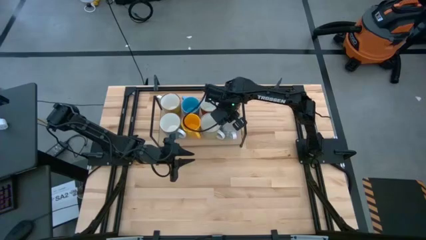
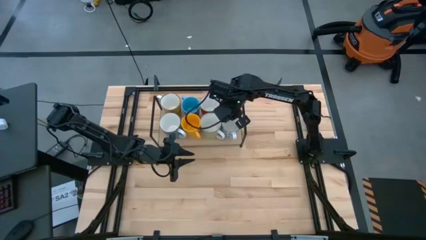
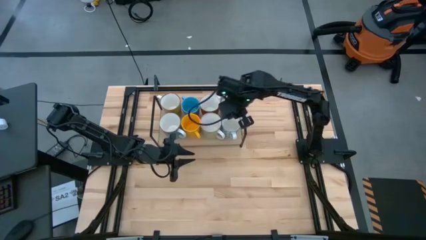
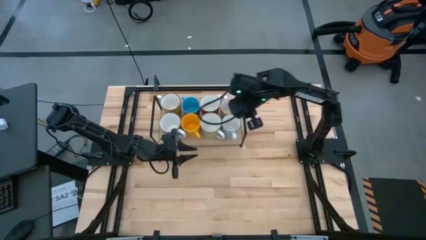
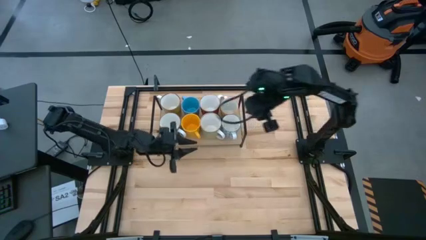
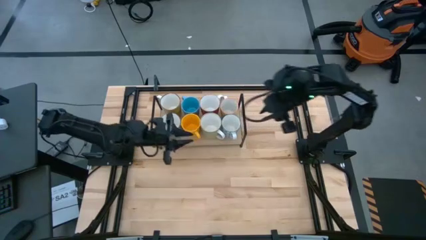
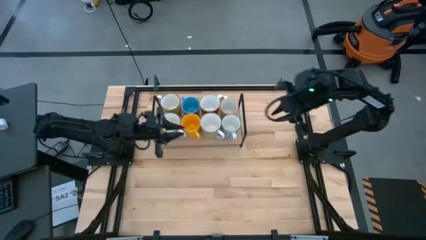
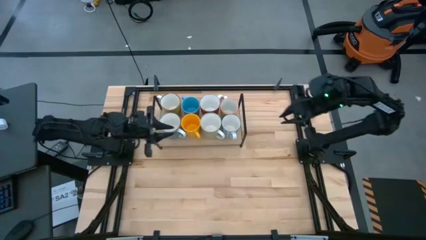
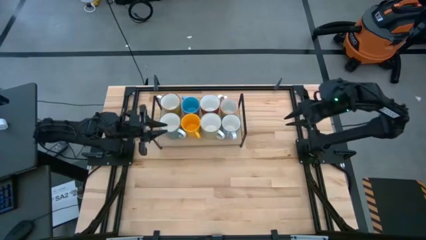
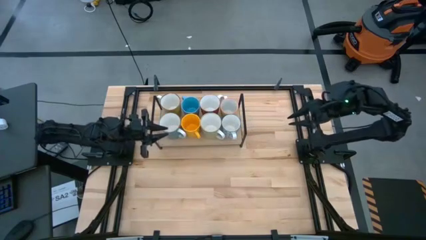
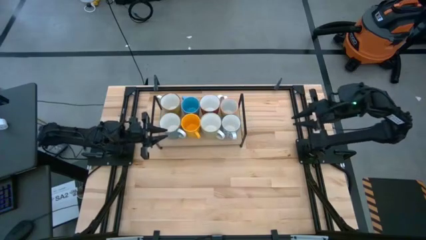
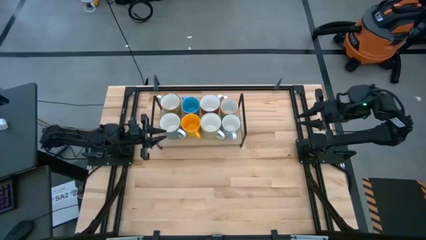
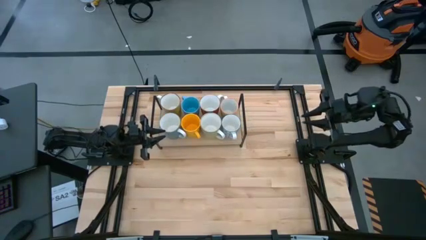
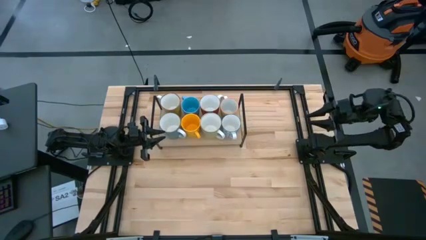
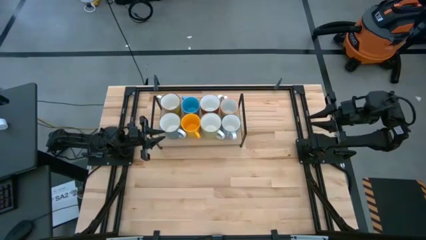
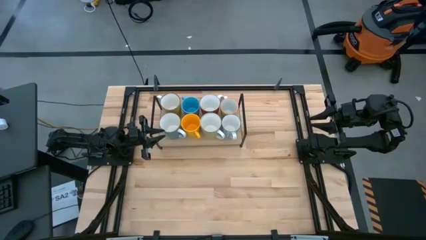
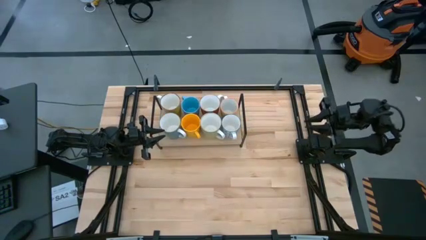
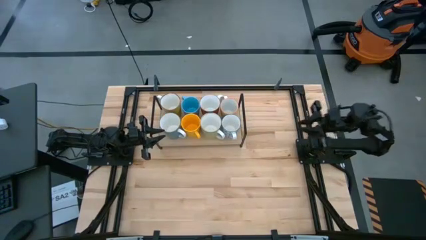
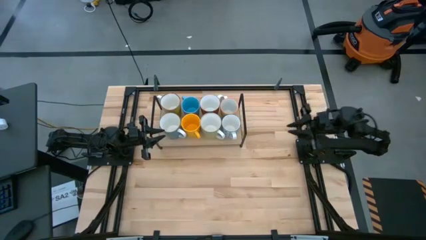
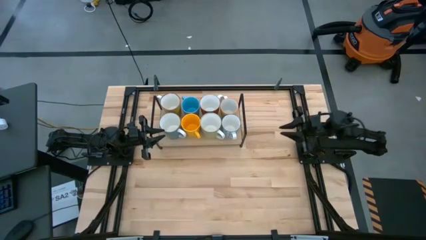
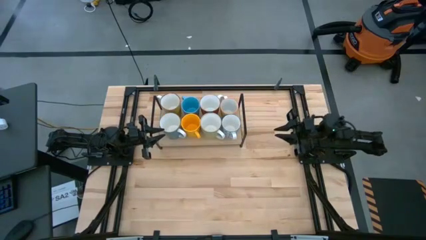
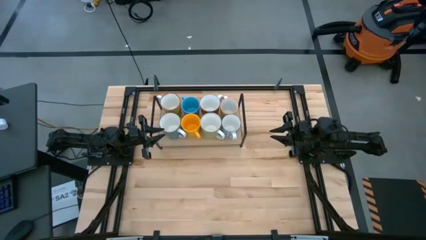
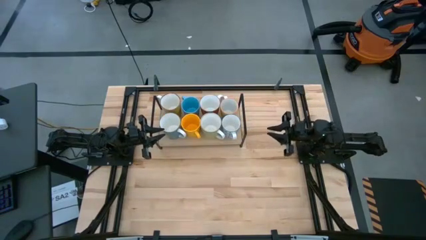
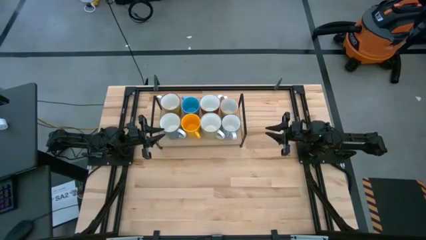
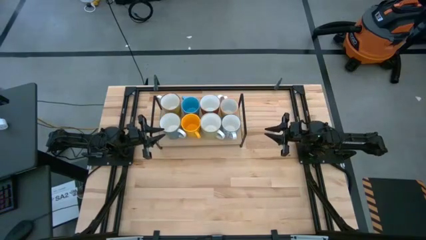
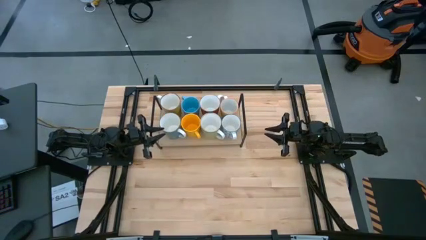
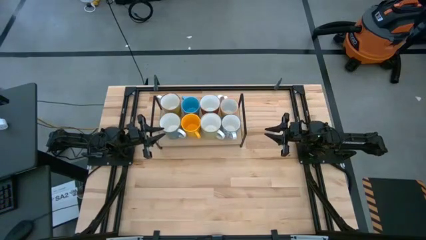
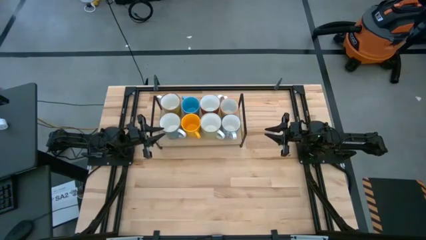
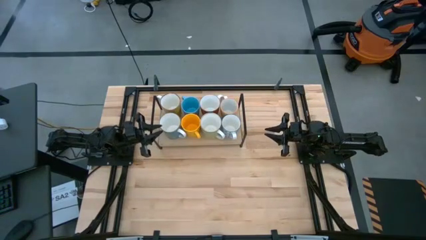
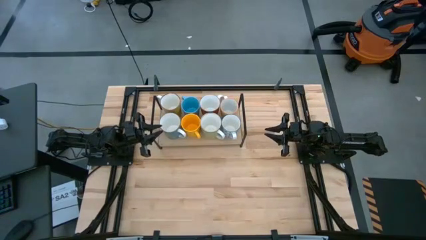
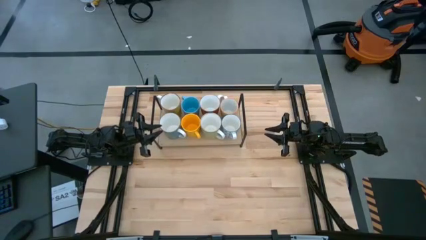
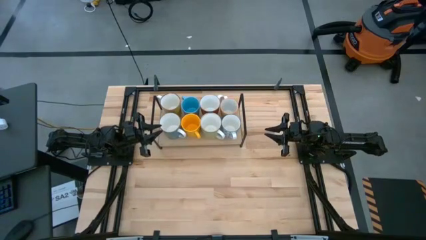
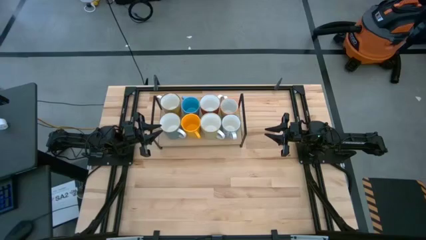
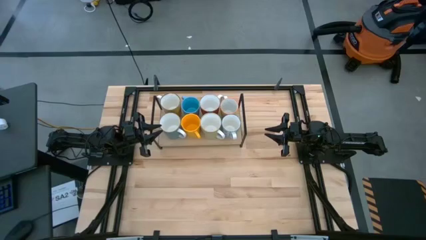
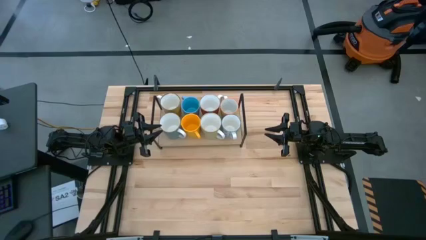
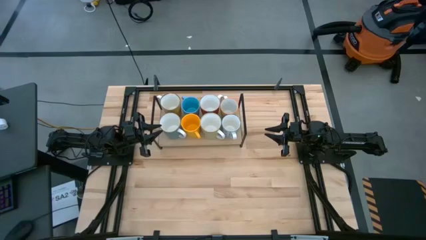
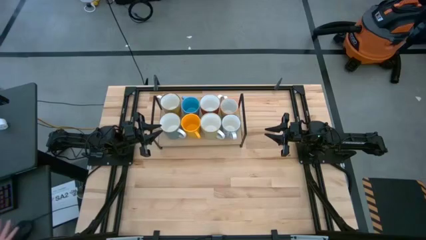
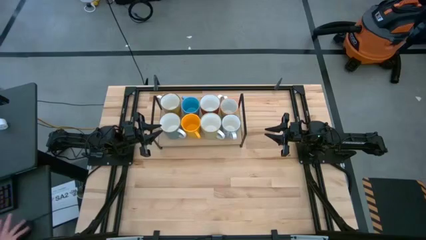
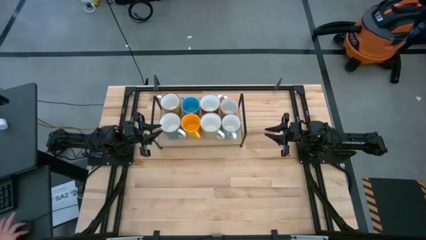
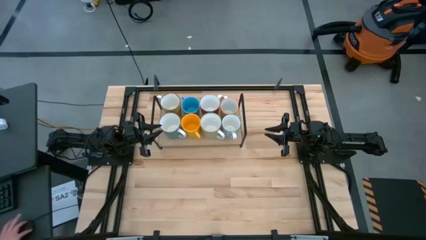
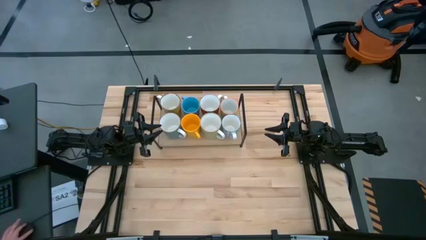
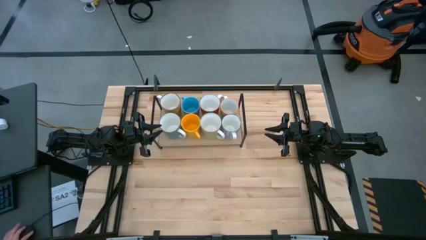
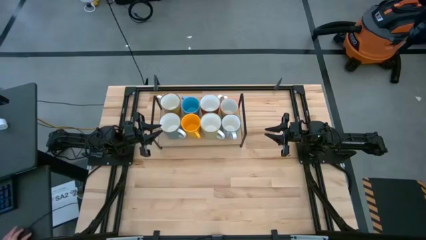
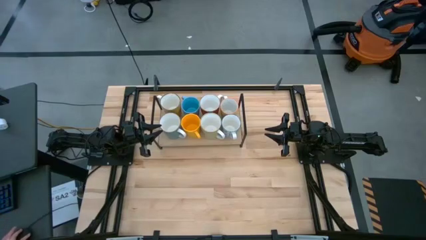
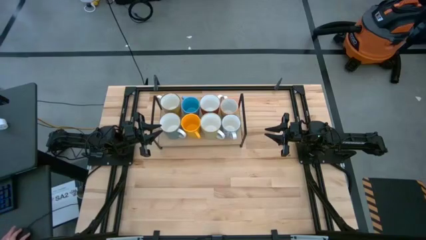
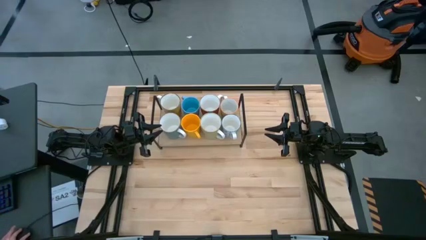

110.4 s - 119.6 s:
Task: Place coffee mugs
Return to Home Position

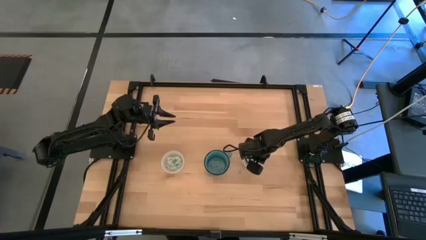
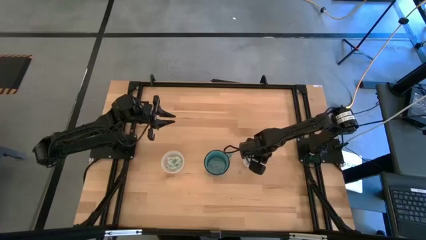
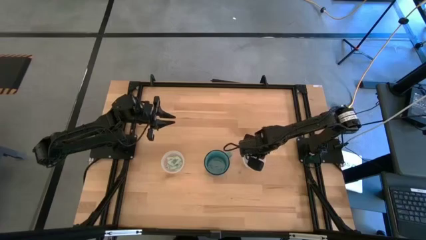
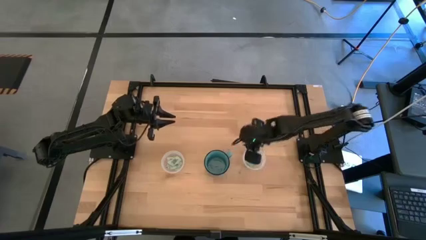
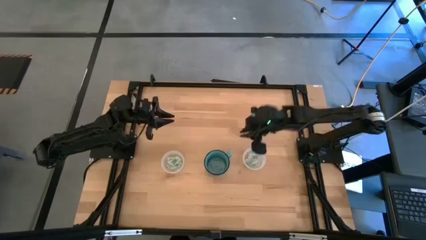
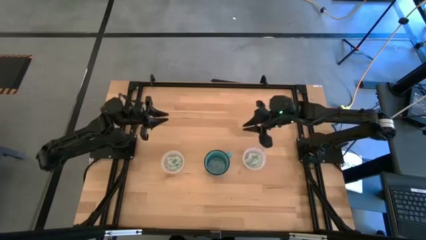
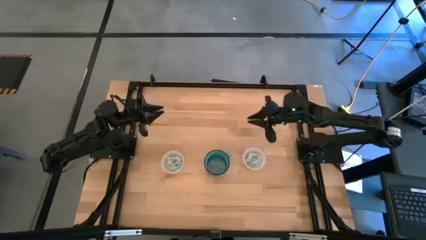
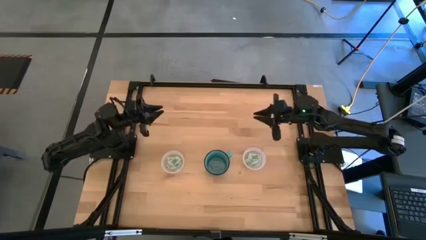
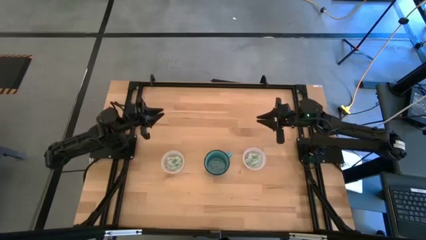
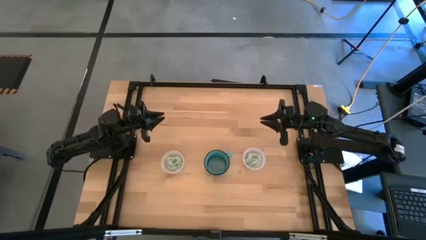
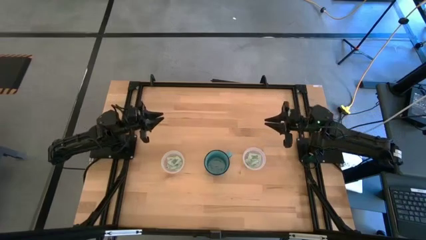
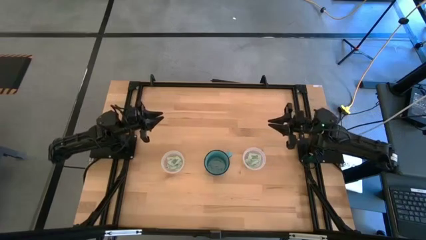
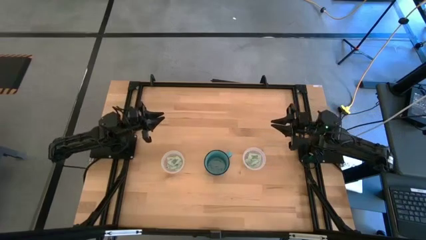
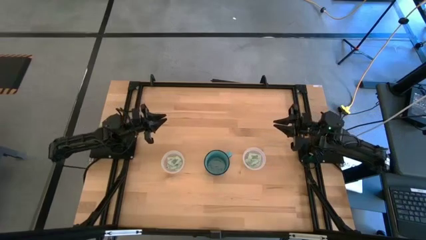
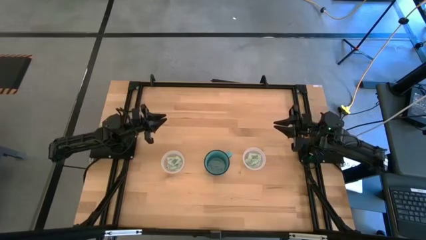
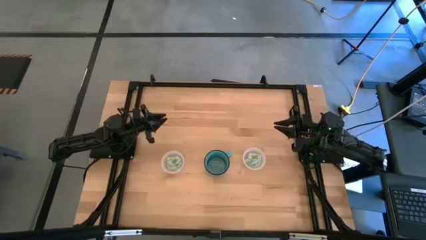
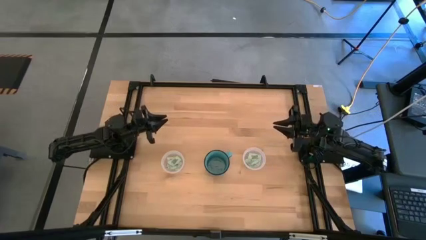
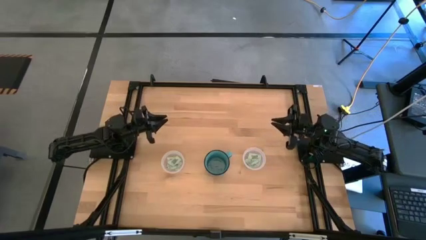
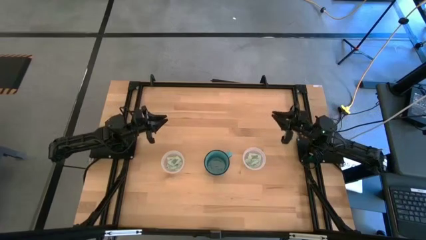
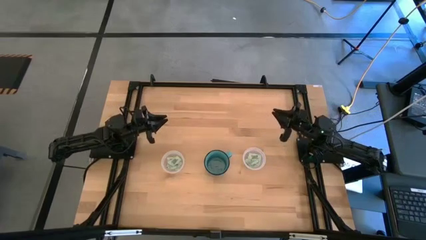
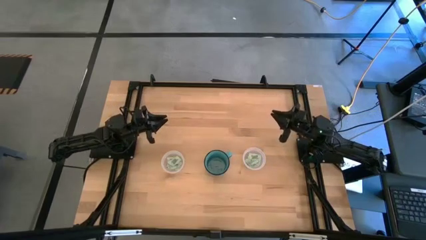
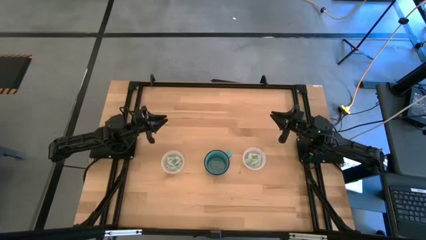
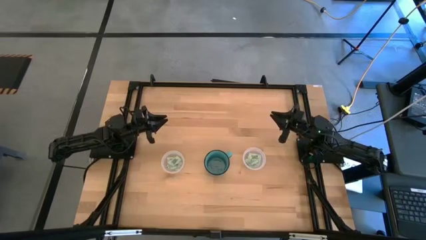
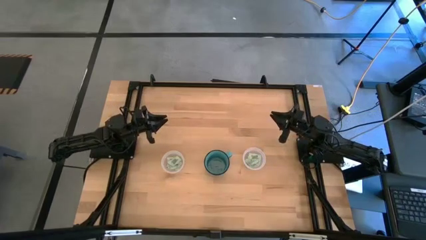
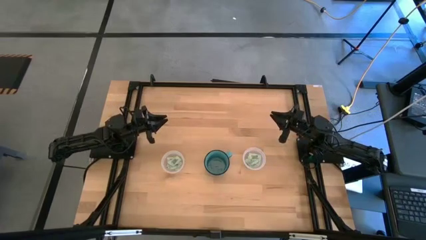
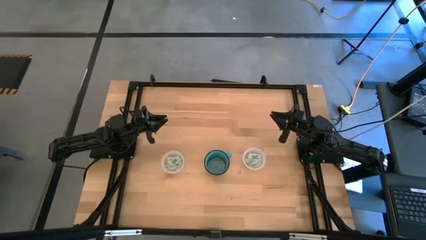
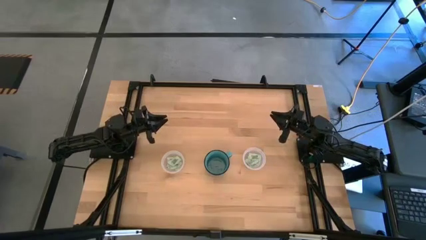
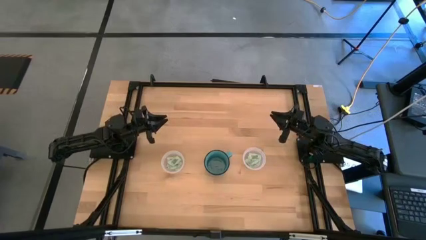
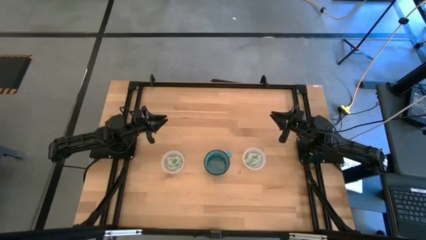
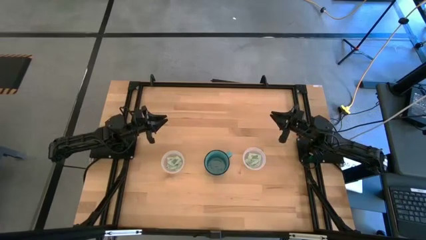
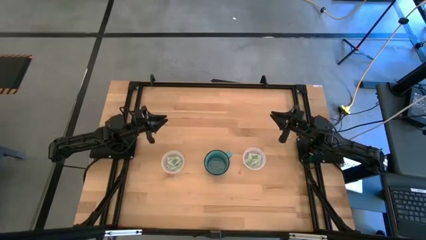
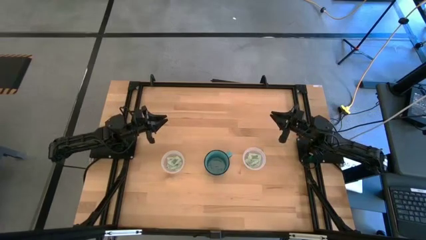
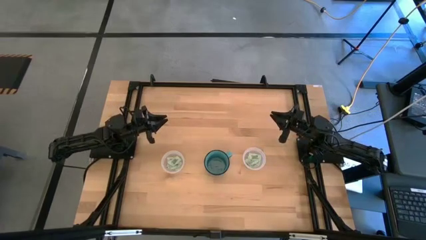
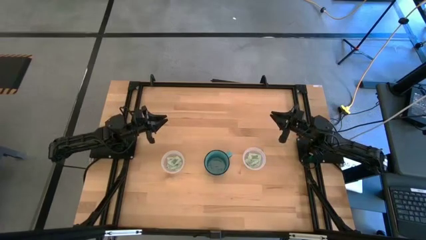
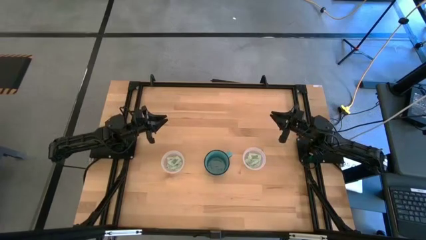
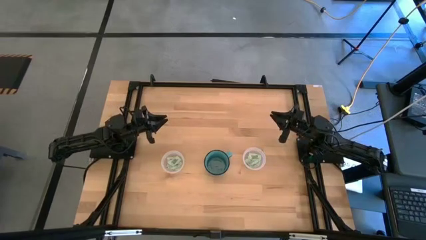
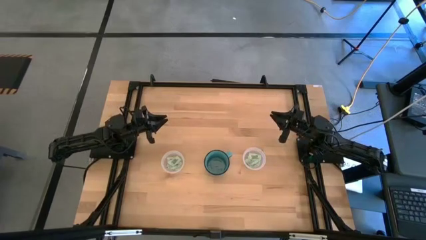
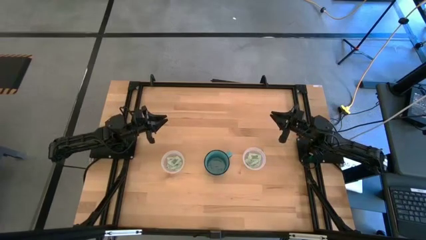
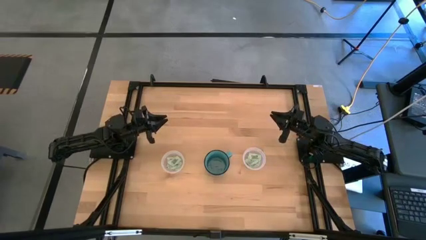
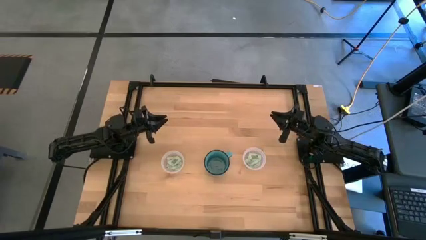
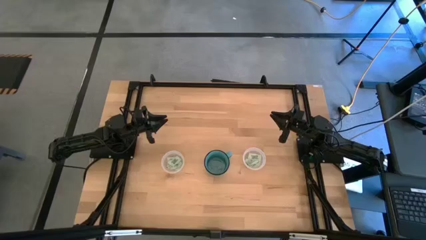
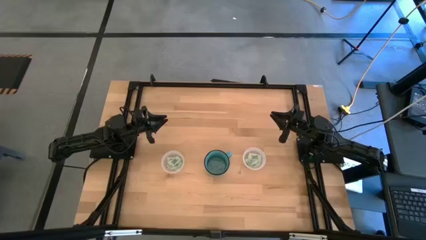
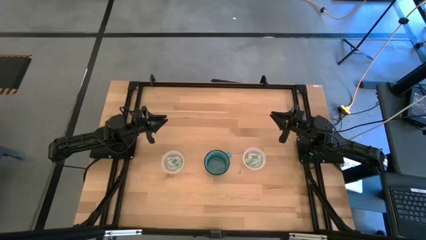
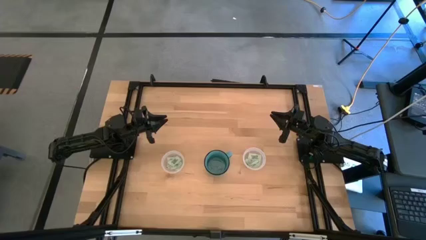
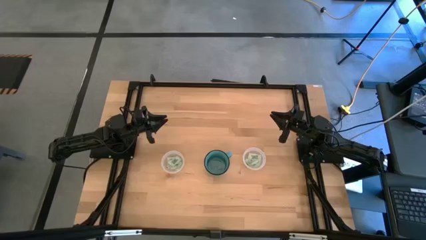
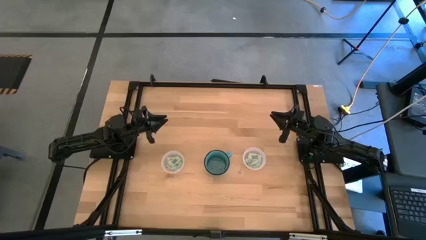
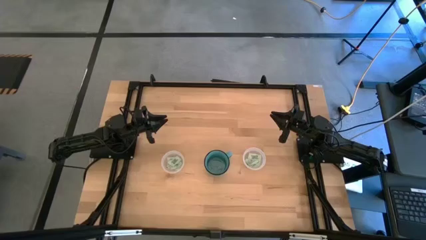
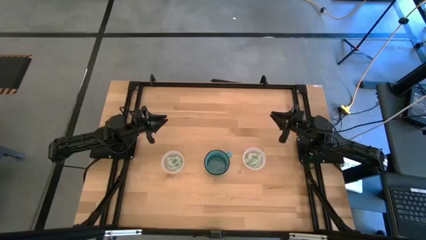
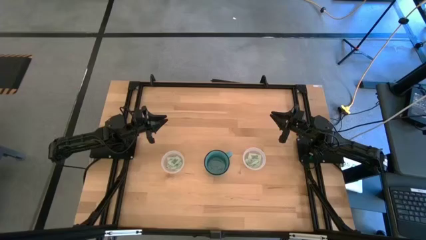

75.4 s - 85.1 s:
Task: Pick and place Stevia / Truvia into bins
Return to Home Position
